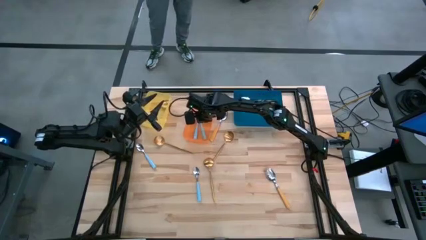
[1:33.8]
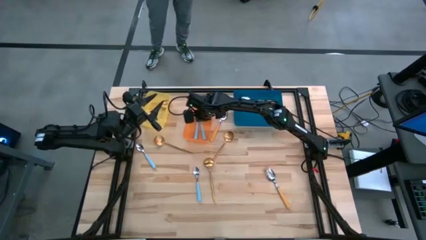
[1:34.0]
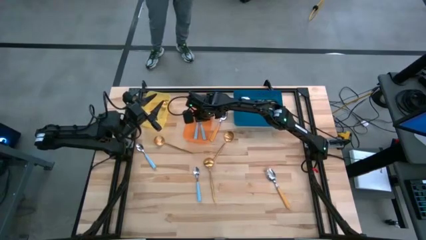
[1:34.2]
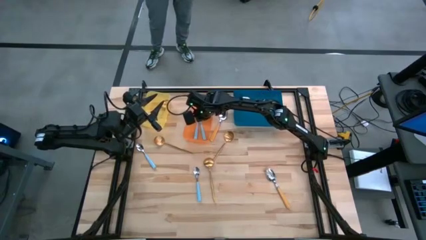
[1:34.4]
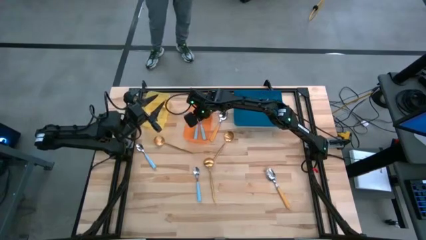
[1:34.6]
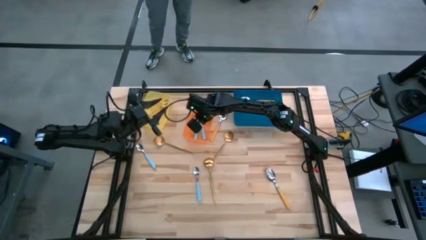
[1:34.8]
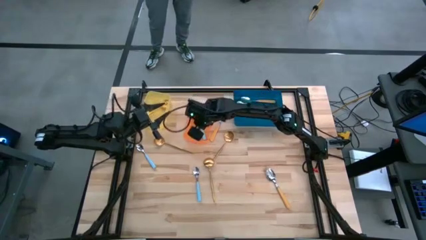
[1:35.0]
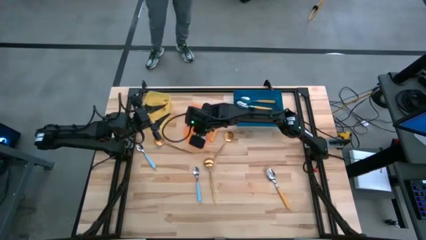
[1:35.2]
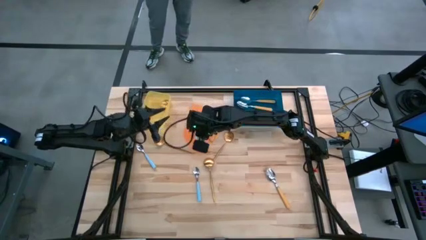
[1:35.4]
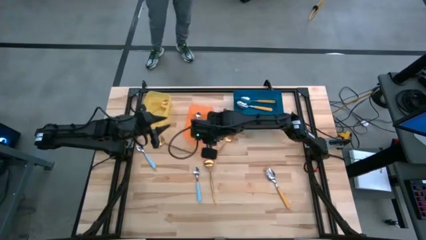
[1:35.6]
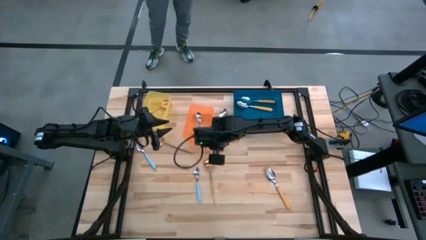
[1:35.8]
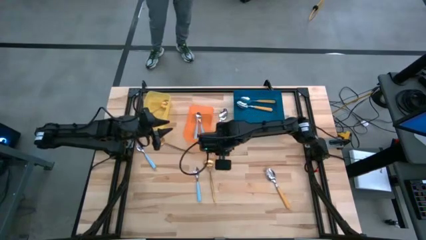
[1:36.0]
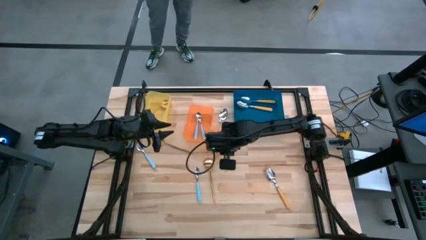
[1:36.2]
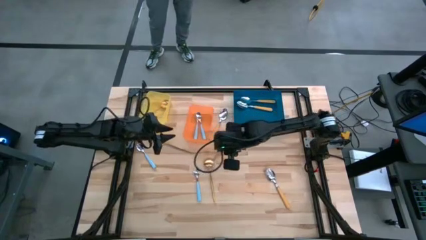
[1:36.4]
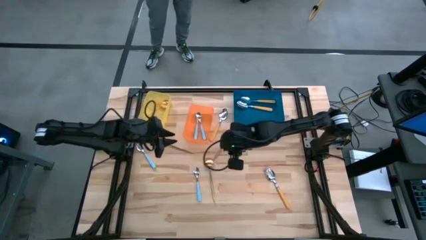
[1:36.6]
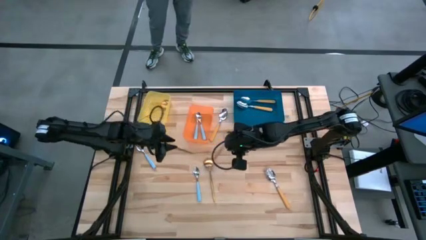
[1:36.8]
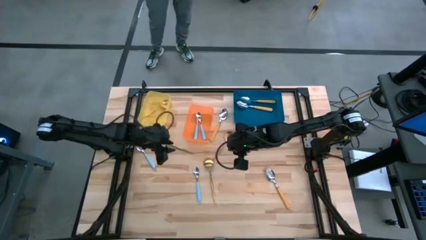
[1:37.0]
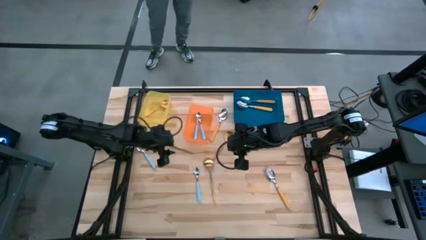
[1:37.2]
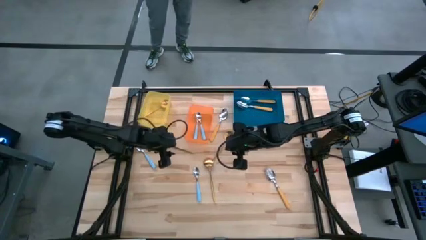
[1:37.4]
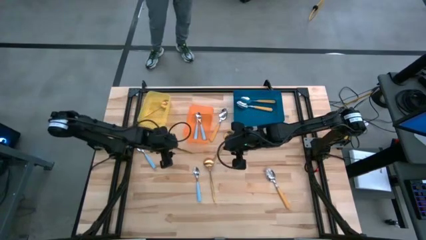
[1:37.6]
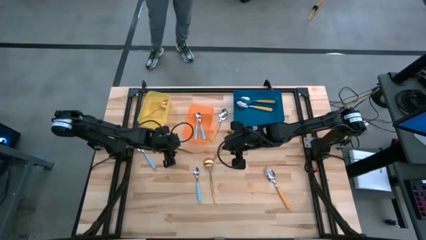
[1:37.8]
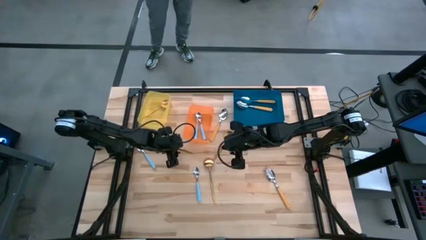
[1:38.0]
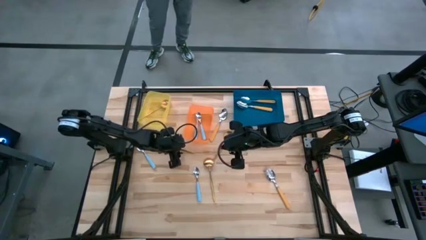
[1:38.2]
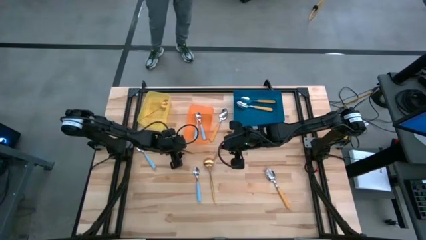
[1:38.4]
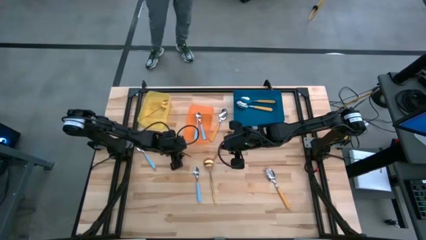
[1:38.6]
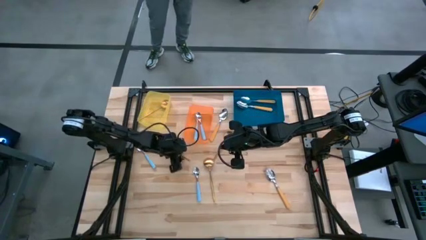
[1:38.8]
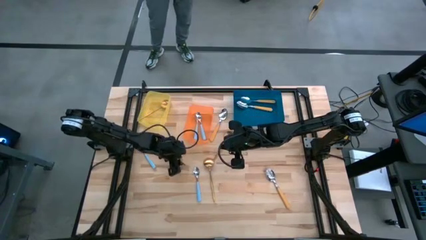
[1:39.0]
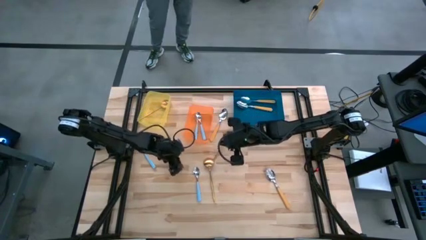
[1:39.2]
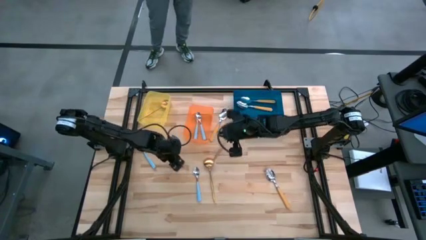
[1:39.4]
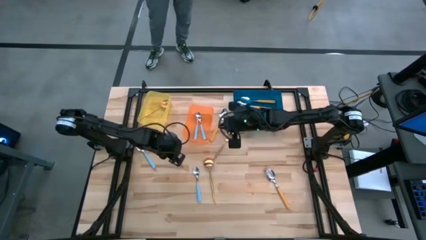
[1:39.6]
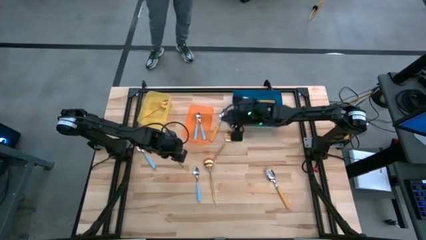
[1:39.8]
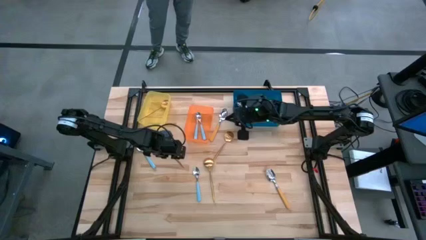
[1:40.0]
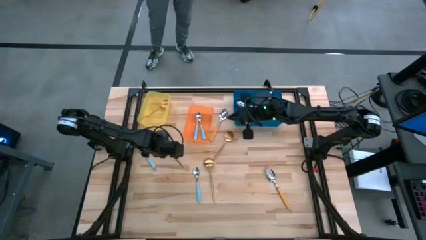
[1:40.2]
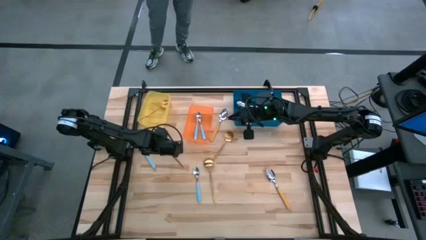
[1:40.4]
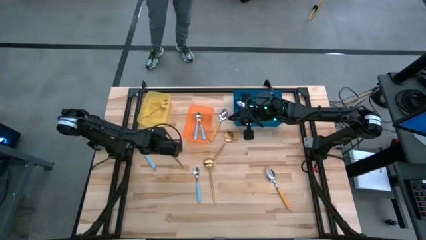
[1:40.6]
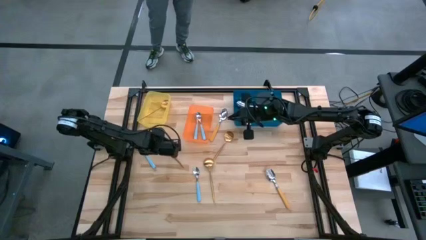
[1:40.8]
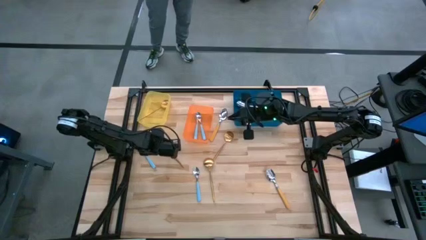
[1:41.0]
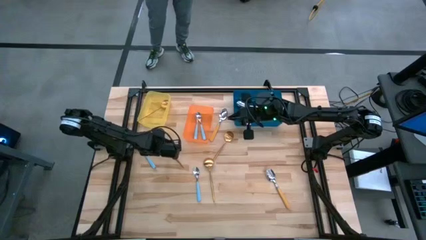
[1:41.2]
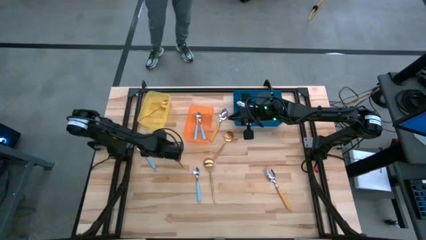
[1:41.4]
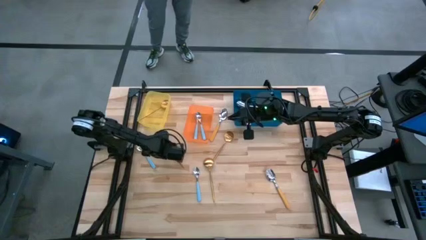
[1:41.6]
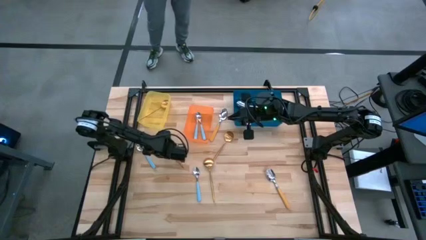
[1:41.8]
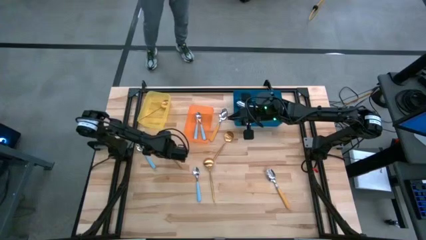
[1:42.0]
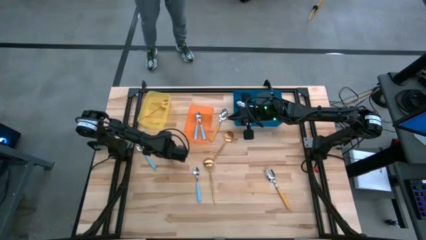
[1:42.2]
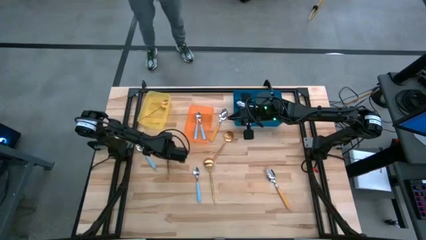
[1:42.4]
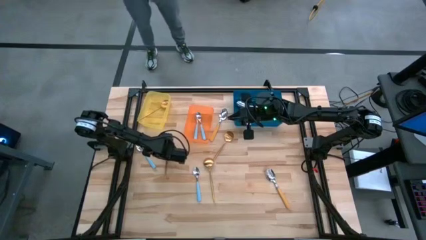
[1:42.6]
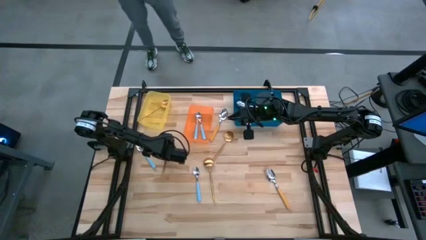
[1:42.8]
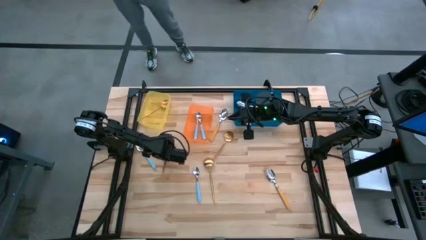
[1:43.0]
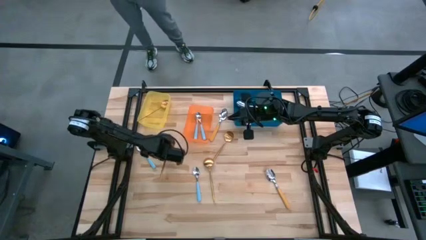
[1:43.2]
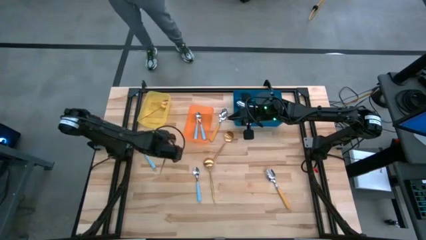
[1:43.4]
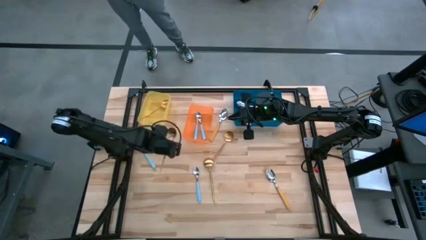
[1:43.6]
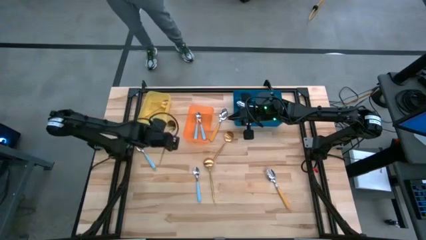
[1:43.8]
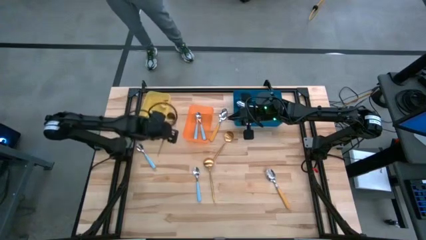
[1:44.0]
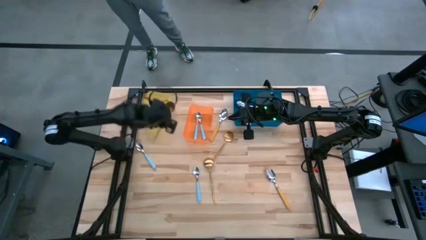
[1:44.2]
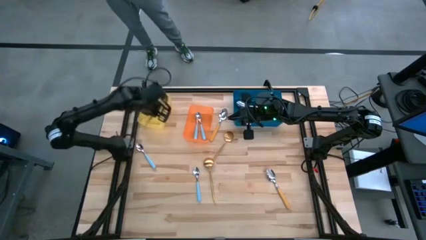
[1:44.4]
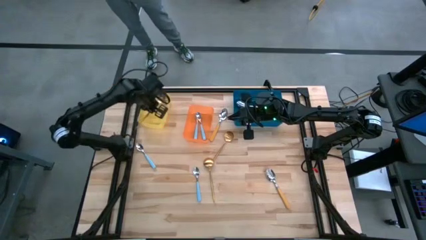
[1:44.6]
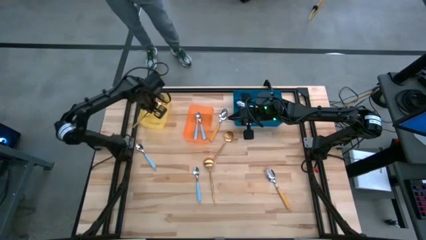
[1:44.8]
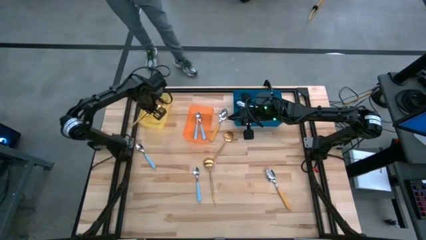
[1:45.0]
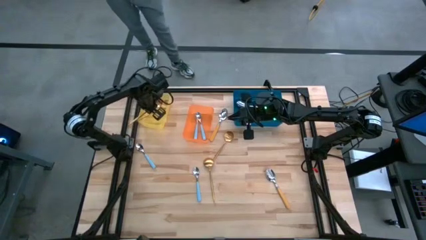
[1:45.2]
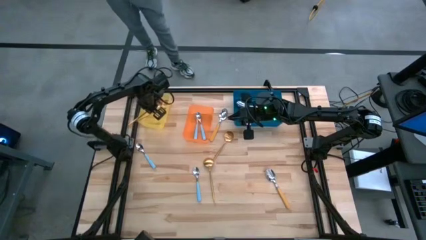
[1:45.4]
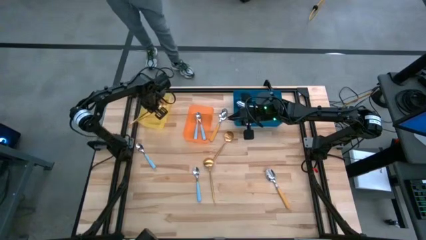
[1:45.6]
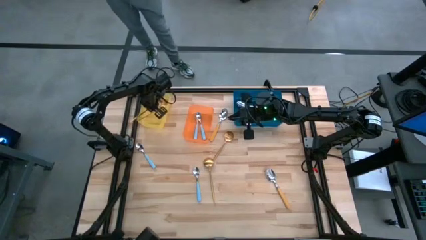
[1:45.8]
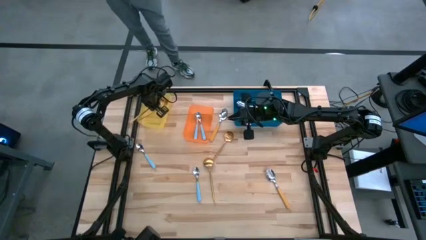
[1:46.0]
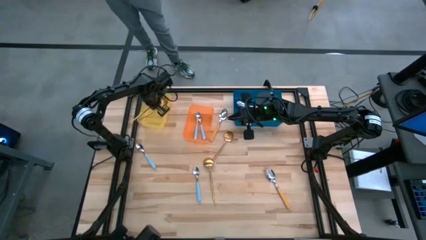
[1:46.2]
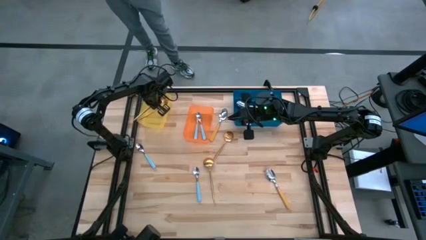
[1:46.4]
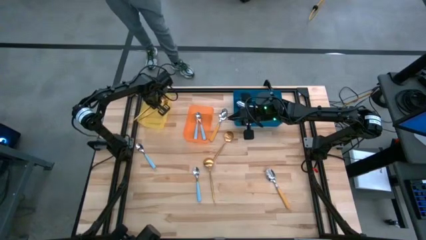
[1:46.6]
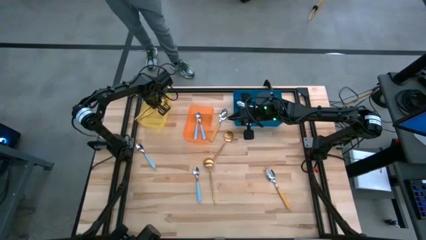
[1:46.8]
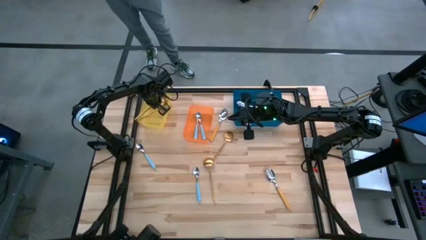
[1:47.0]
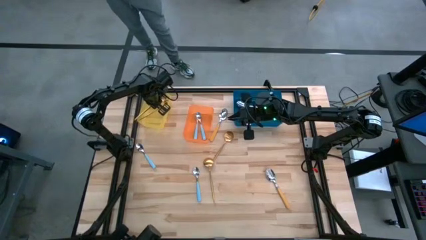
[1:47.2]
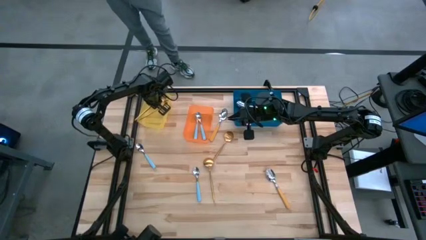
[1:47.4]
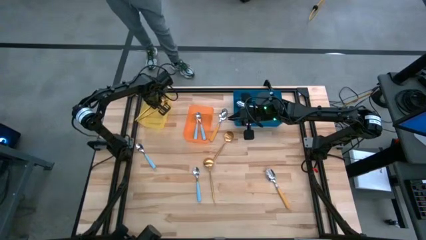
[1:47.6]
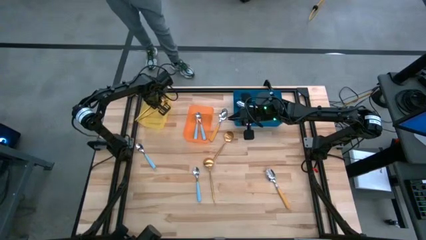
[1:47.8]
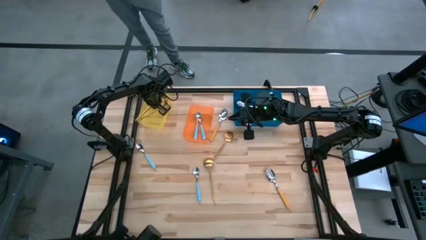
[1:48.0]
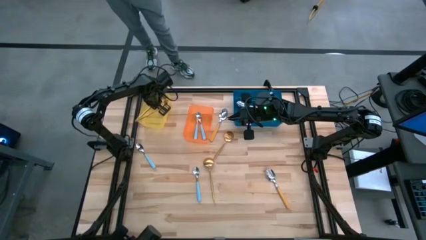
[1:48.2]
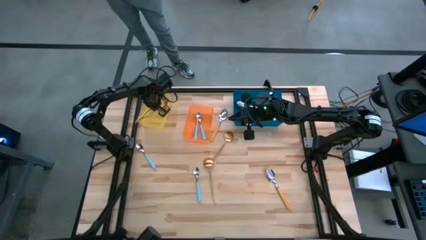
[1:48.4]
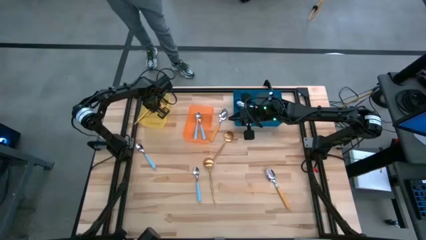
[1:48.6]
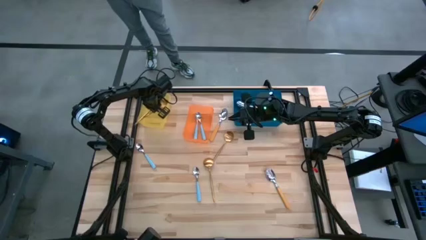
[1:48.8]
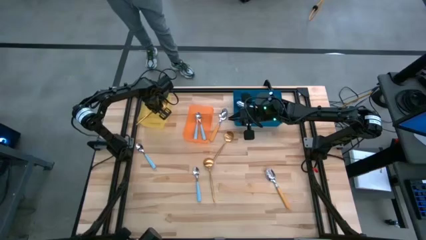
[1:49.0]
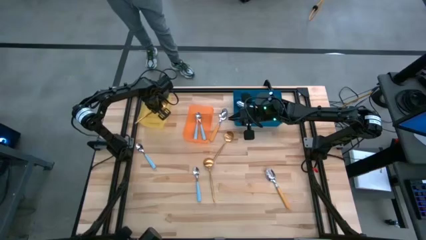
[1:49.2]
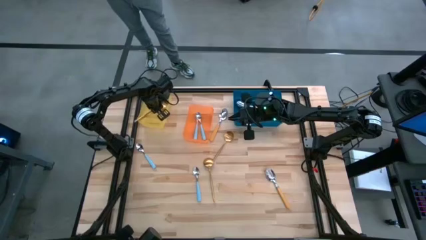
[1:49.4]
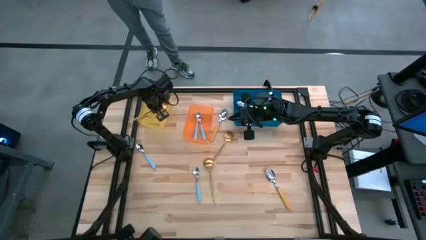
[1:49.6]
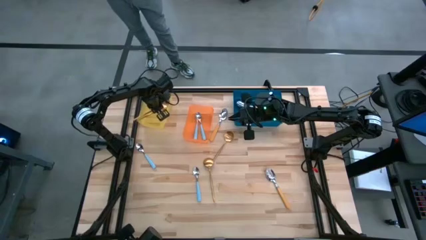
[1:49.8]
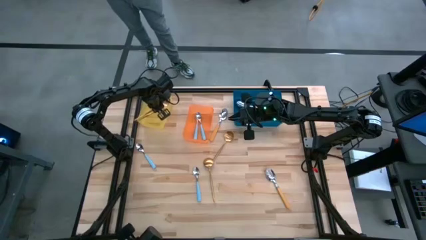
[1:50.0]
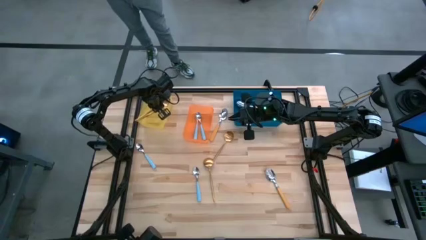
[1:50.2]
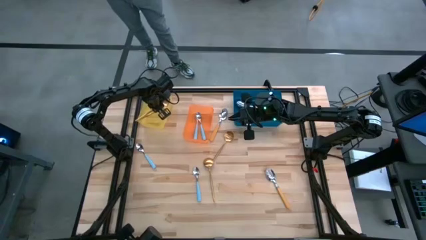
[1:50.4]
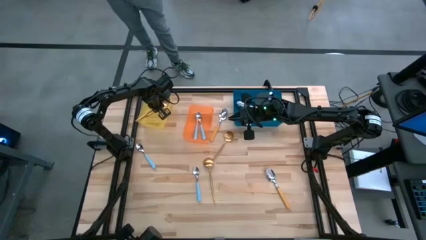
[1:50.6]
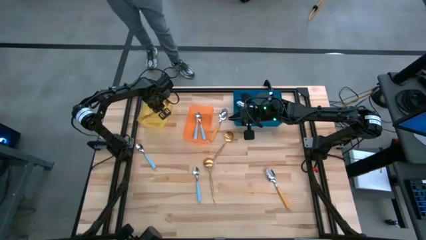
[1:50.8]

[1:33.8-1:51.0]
Task: Sort silverware by color (type)
Put the gold spoon into the yellow bin
